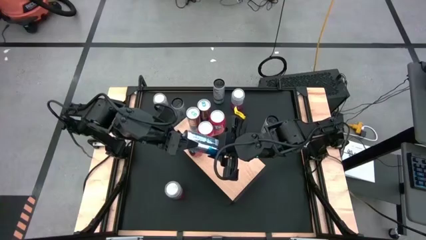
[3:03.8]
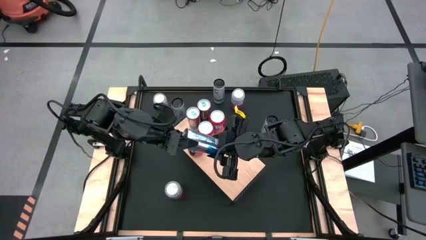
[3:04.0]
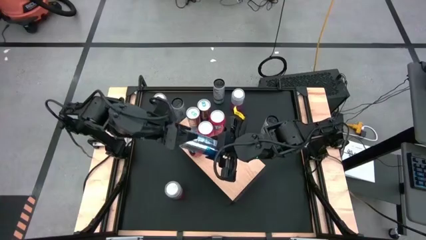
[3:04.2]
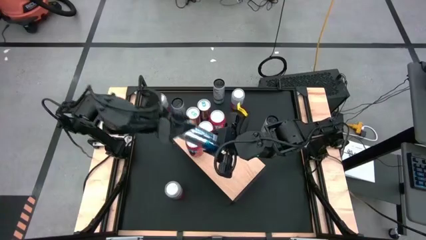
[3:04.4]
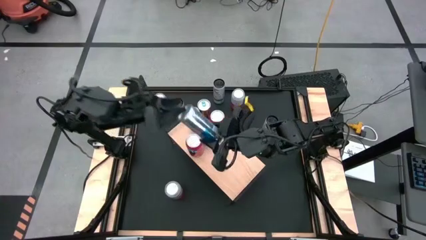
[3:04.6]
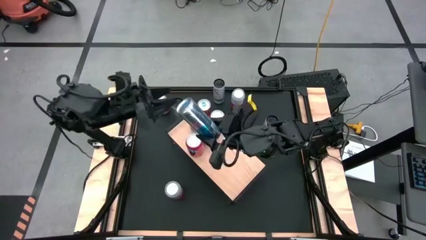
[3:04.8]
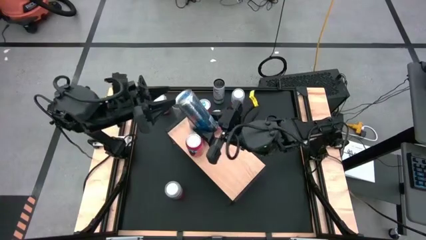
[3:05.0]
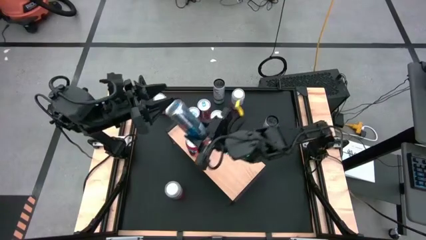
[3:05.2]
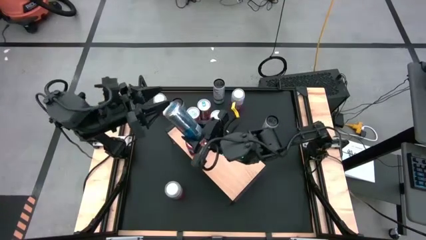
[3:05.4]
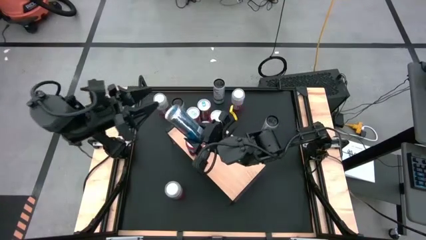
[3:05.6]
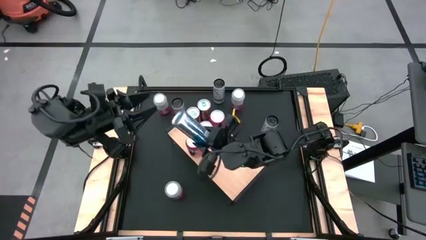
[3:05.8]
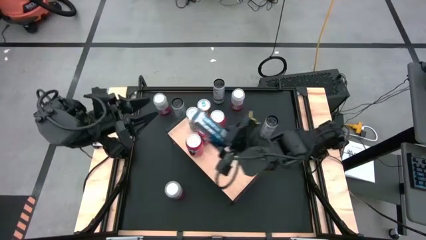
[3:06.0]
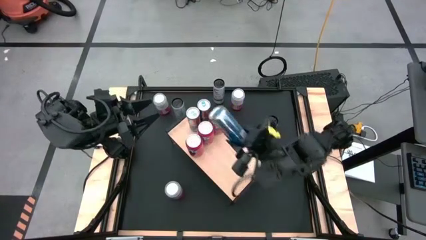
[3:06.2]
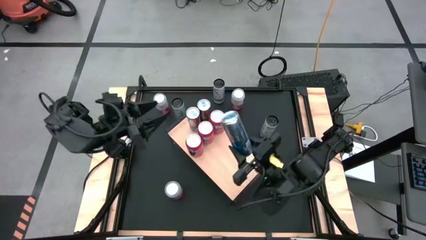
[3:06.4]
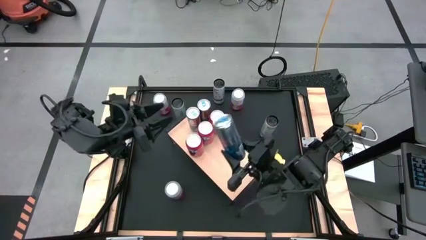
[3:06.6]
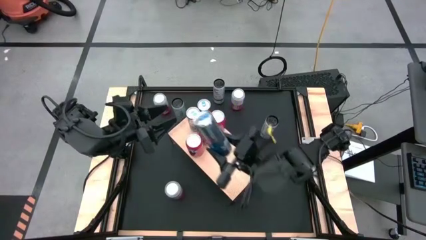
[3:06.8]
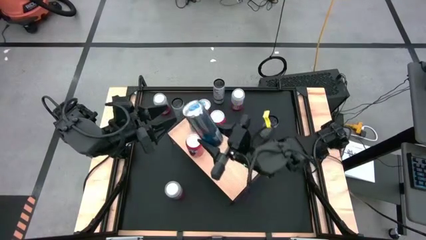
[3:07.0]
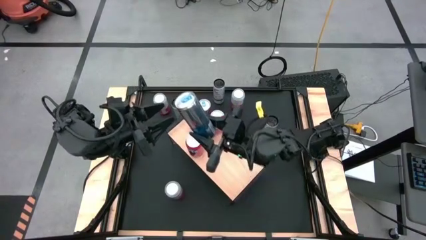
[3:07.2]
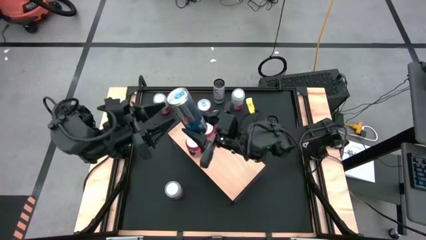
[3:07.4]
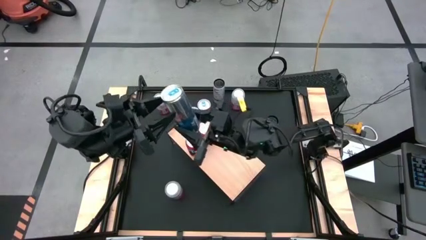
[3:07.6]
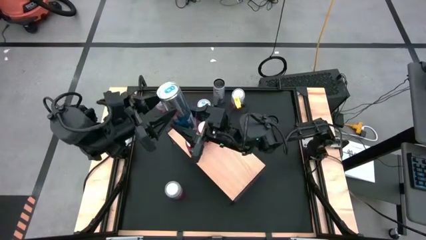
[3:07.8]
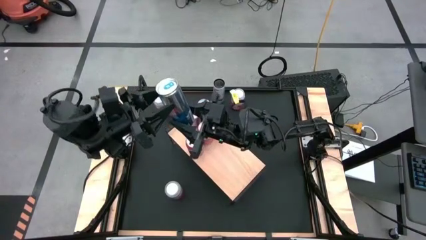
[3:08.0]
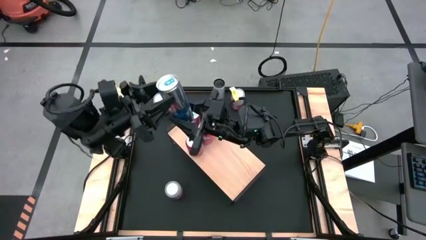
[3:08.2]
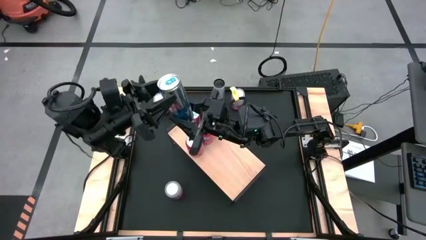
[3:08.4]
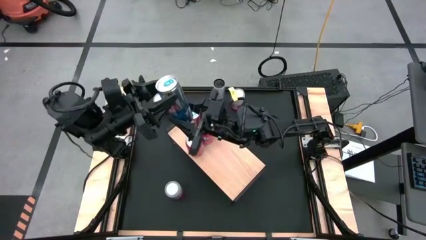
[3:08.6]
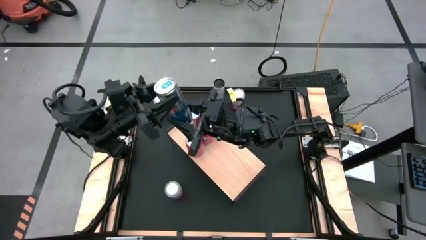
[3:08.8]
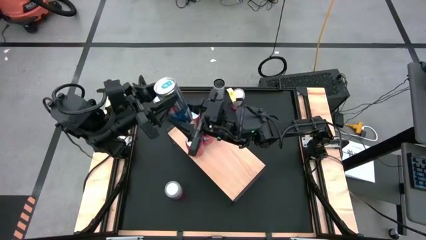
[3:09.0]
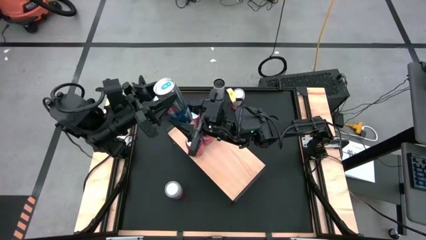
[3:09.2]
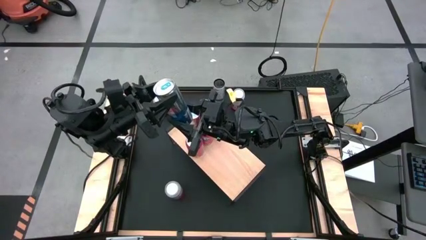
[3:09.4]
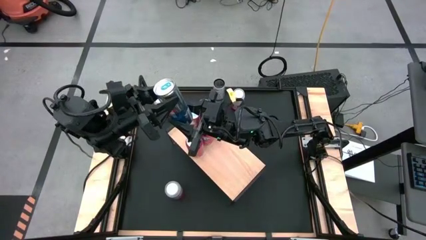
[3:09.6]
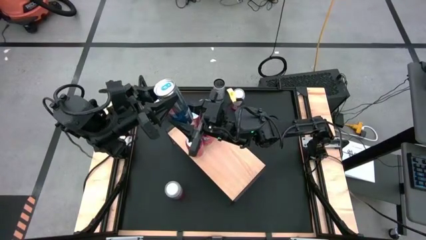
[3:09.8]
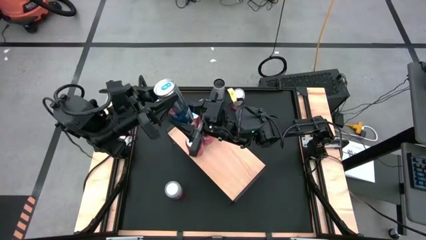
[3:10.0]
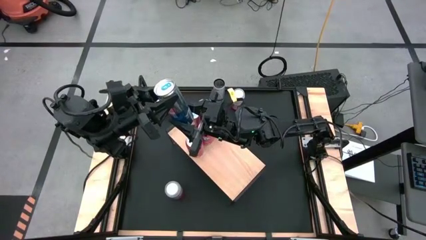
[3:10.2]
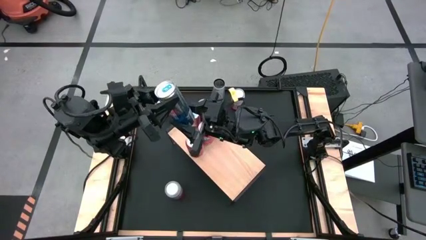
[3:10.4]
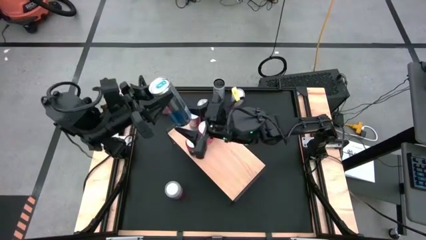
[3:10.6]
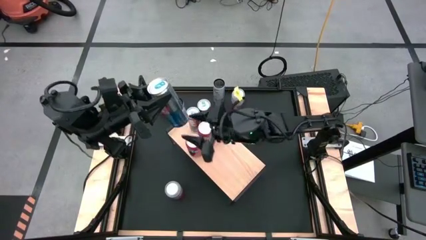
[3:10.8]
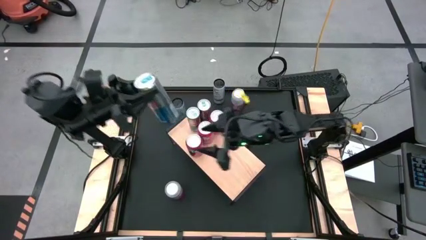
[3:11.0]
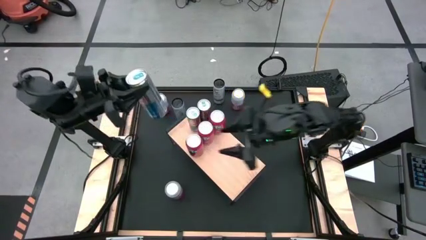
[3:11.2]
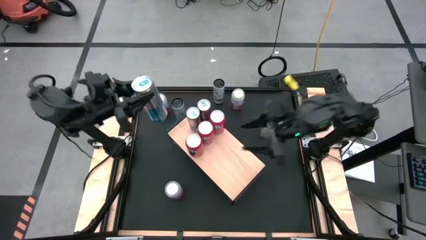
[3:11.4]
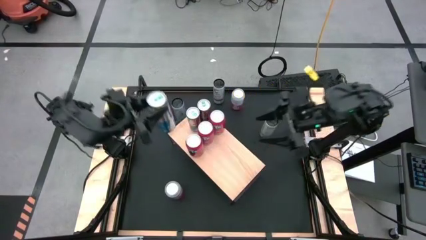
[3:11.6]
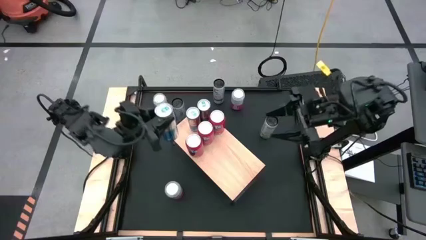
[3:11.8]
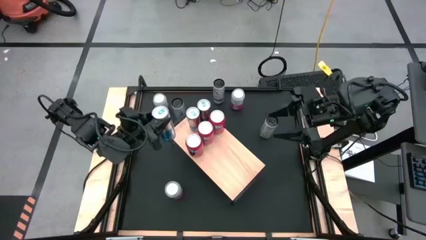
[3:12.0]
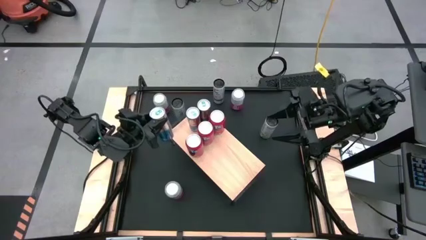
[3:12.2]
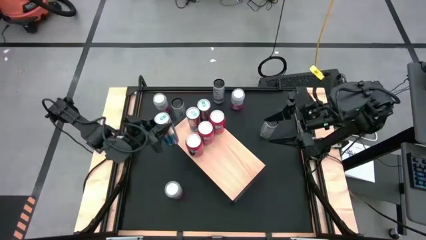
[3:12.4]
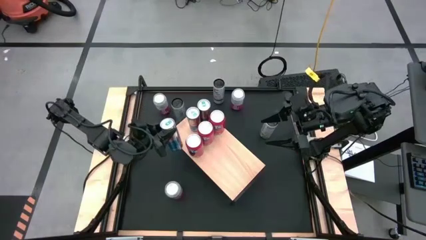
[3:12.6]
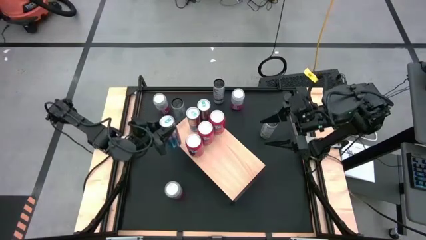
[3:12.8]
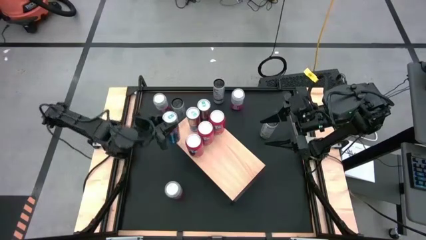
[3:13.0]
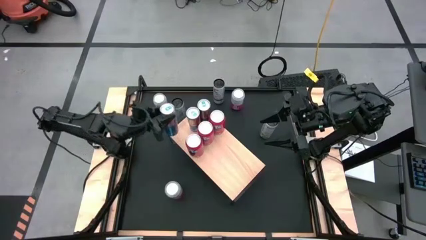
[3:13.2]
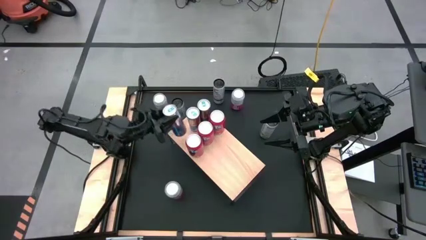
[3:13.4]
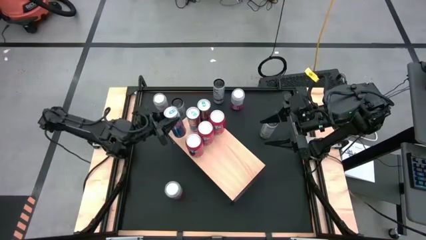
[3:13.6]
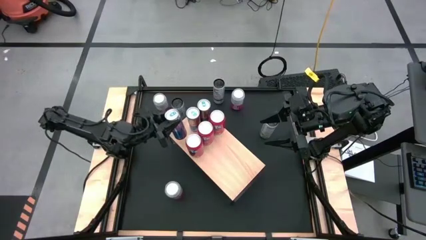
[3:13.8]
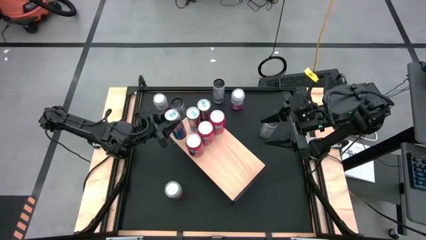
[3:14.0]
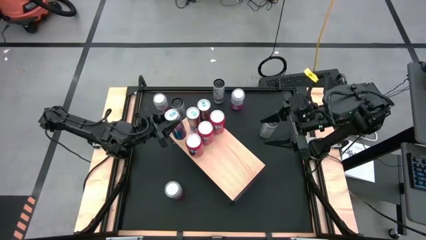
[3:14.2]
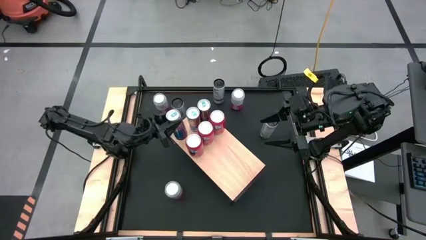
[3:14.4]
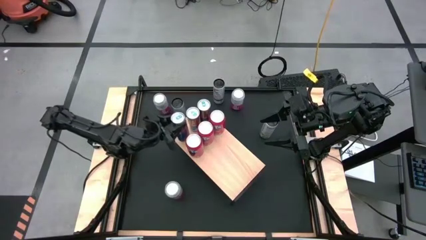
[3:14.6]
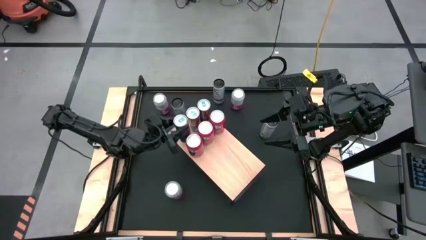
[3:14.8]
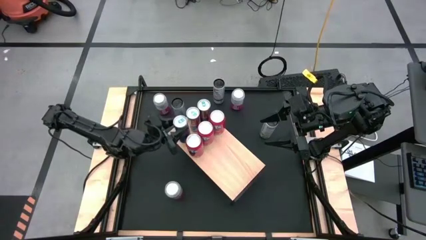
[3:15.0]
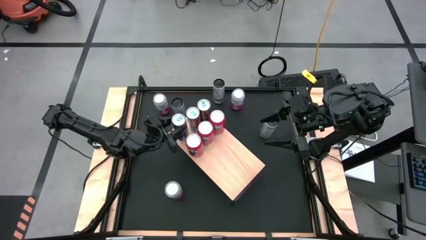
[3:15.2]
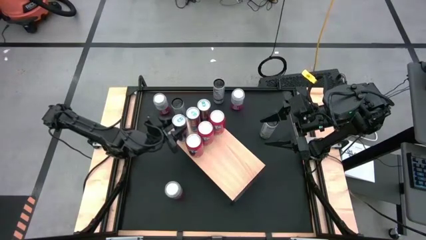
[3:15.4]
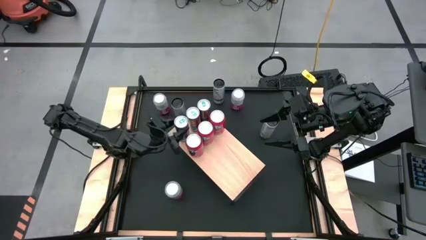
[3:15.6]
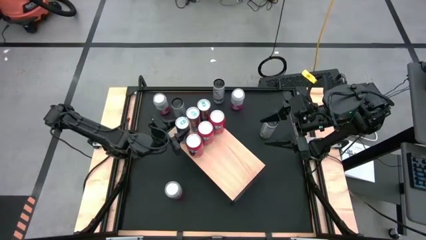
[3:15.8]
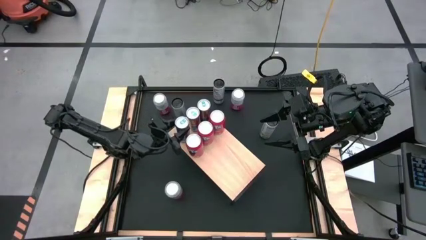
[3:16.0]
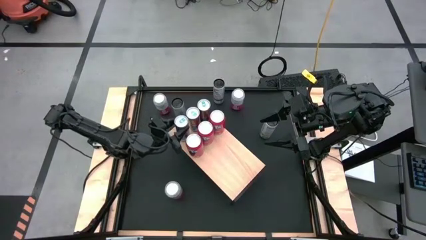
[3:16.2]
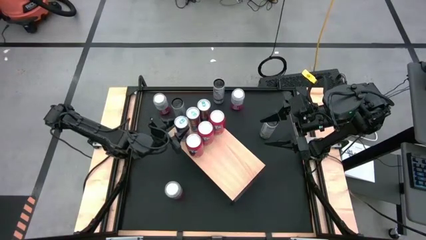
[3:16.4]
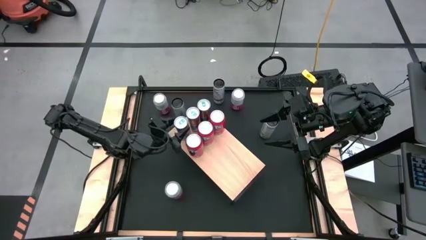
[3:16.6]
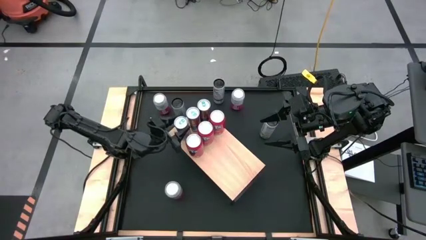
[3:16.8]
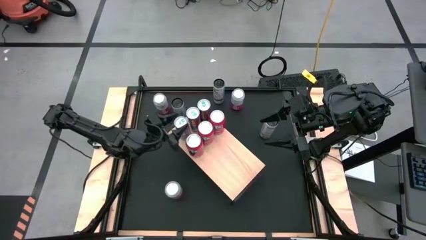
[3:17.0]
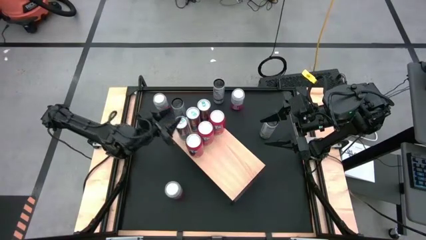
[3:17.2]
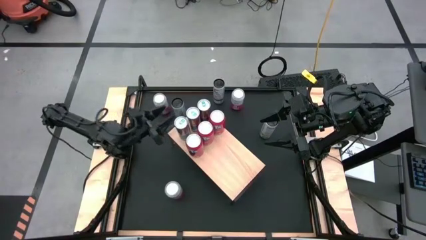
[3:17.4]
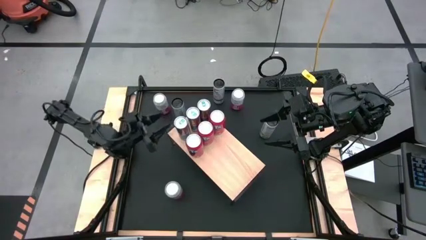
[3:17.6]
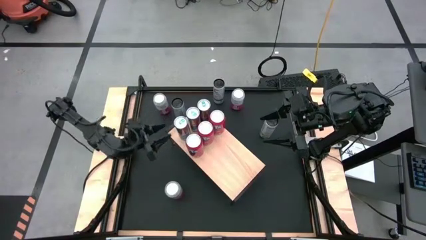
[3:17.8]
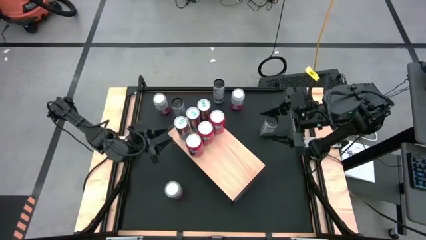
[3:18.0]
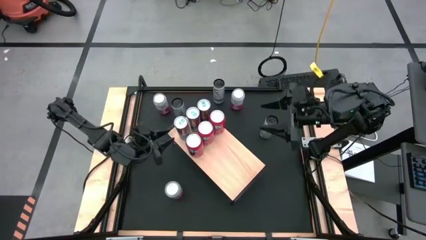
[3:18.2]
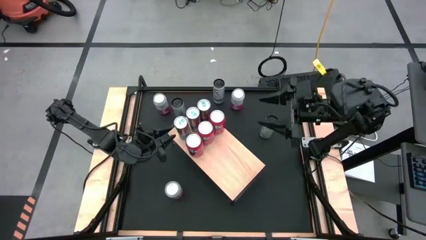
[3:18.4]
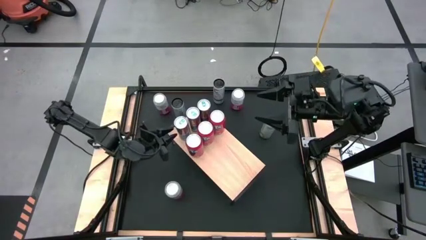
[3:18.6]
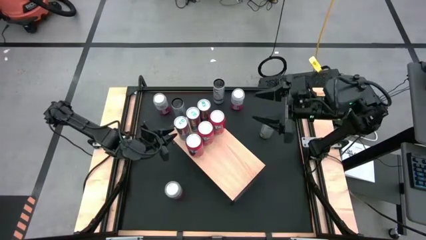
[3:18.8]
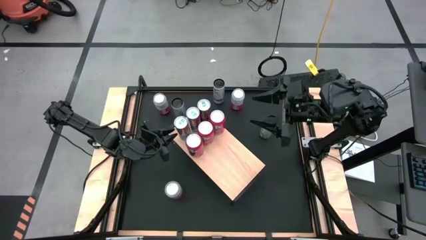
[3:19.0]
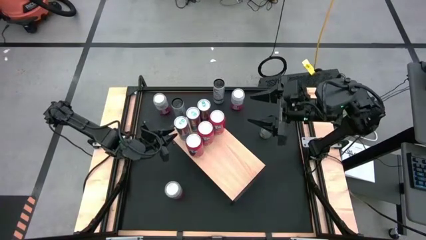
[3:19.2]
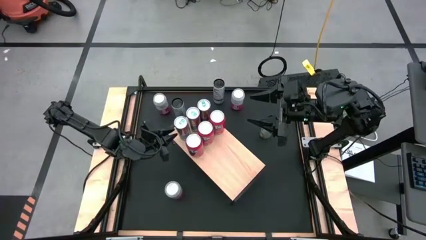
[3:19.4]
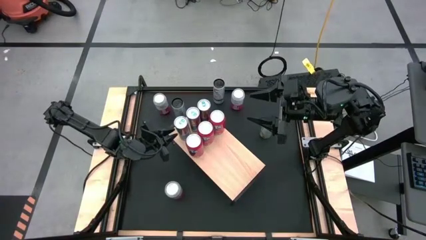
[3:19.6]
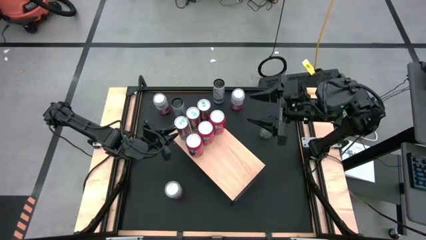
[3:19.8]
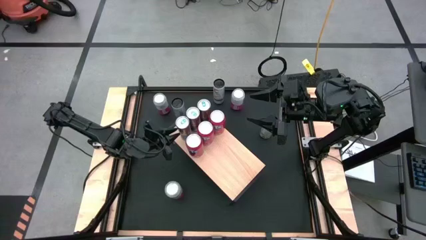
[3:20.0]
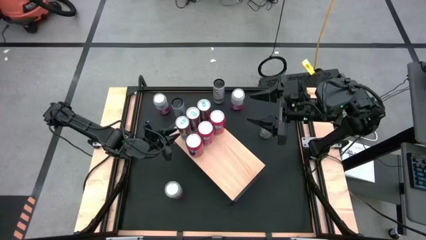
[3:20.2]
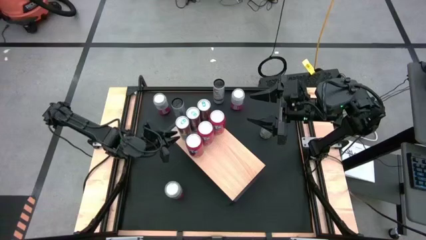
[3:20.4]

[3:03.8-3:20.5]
Task: Place canned beverage on shelf
Put the blue soda can on the shelf aligned with the other blue soda cans
